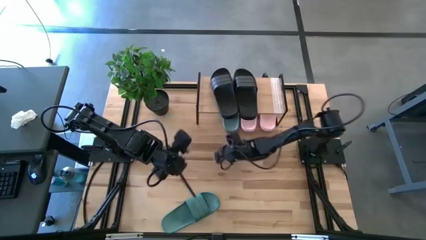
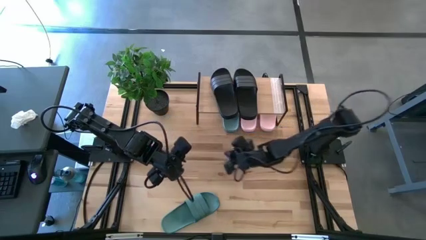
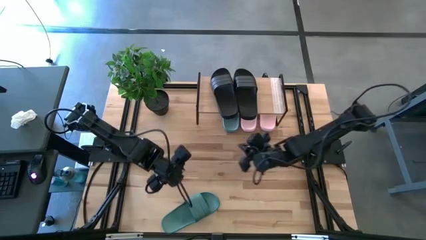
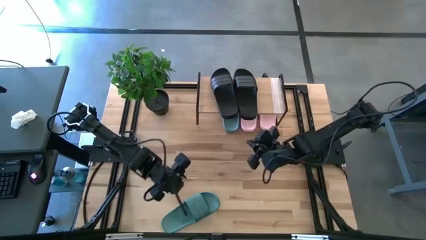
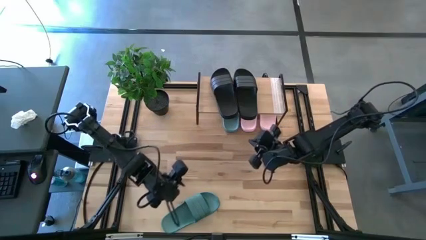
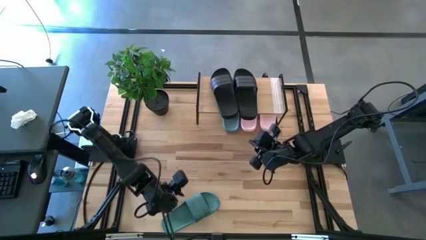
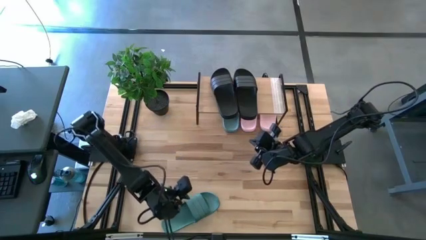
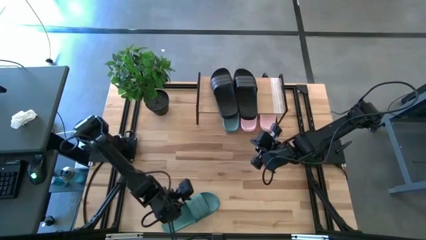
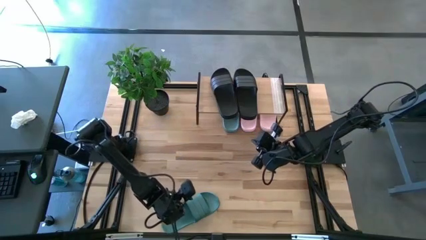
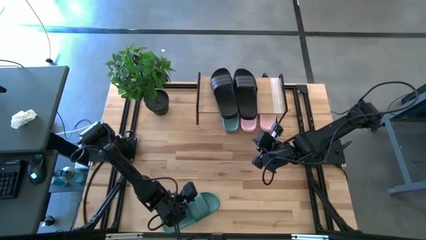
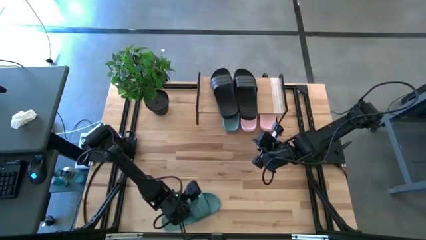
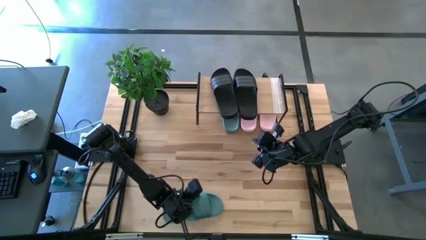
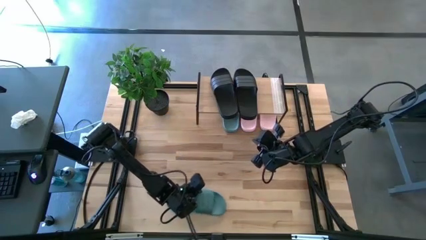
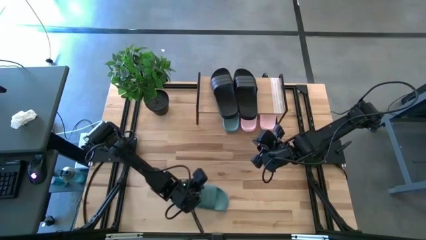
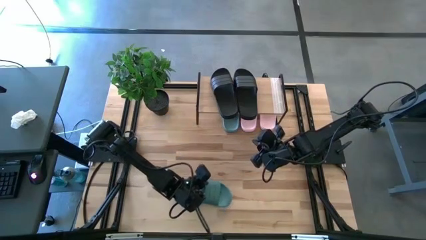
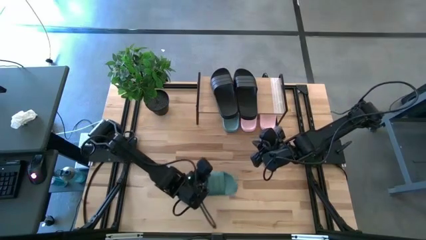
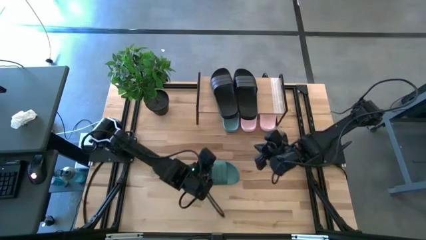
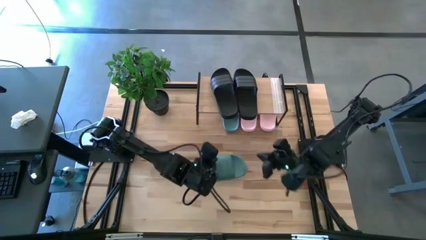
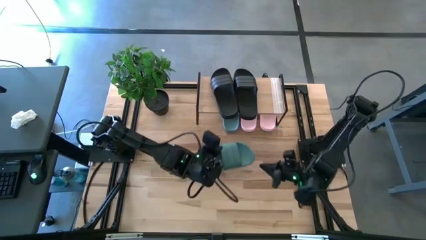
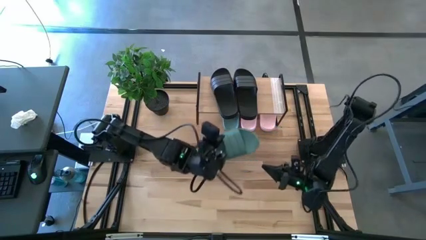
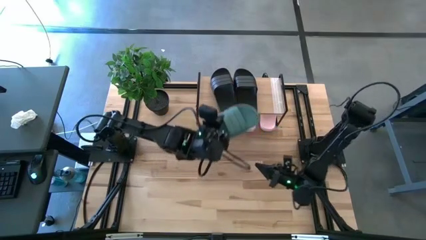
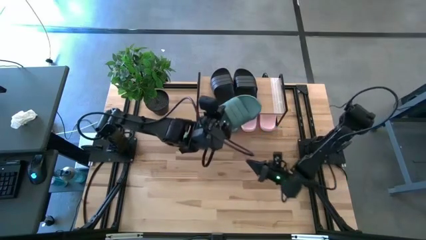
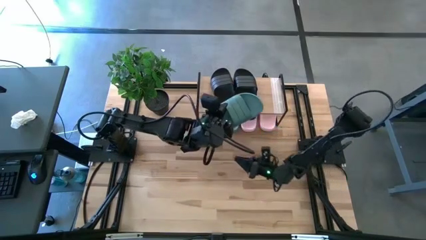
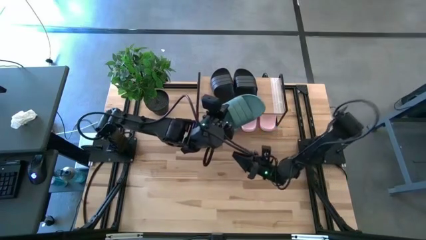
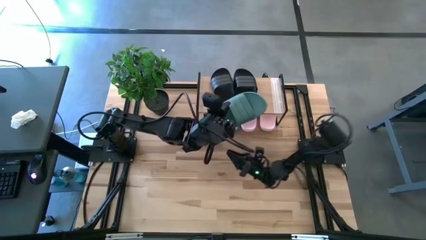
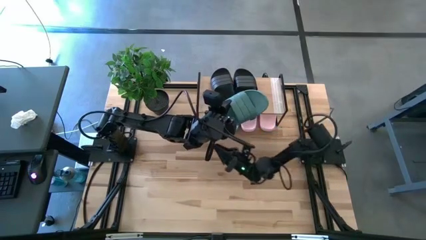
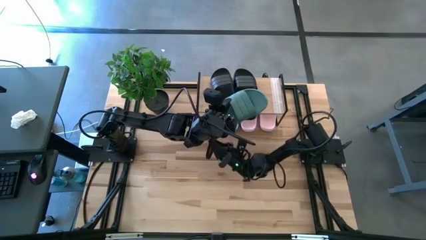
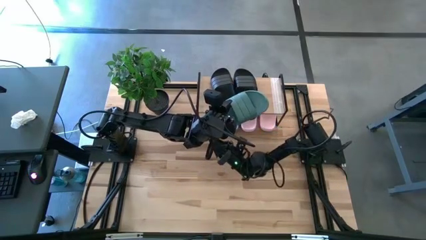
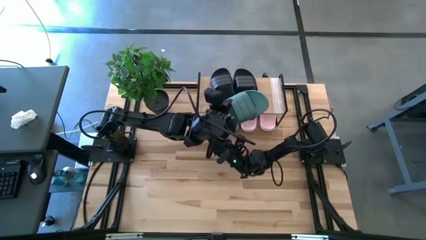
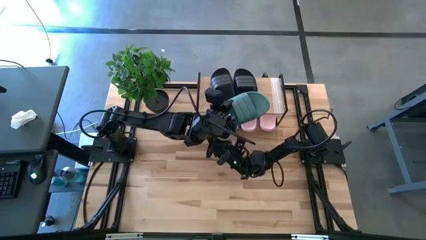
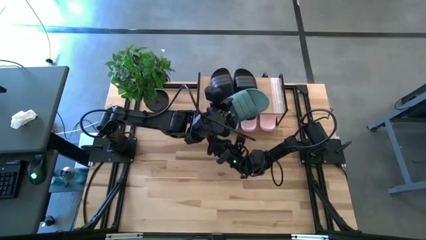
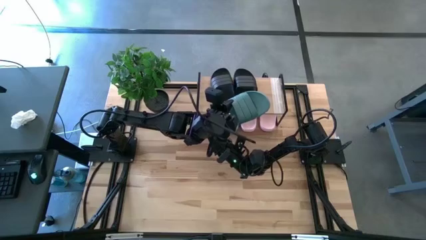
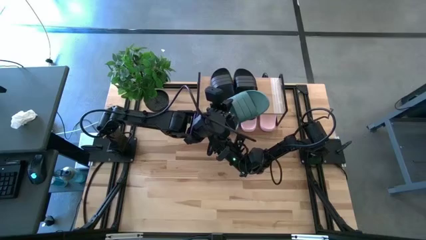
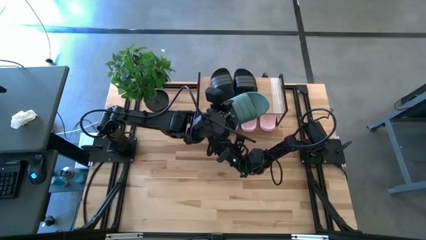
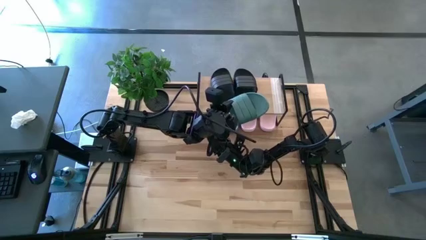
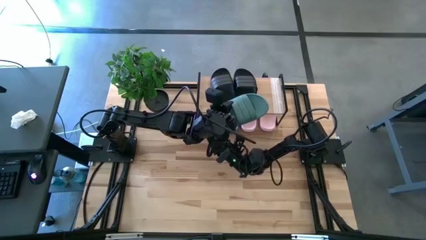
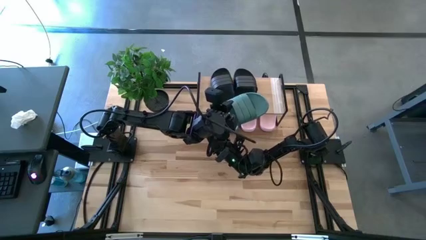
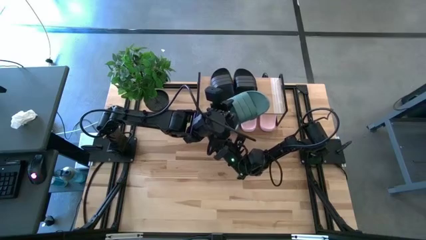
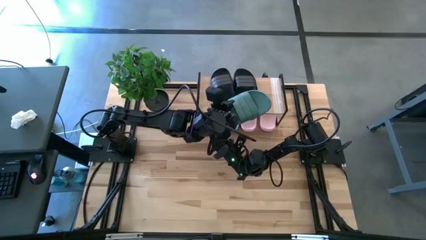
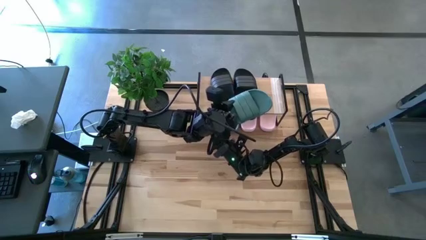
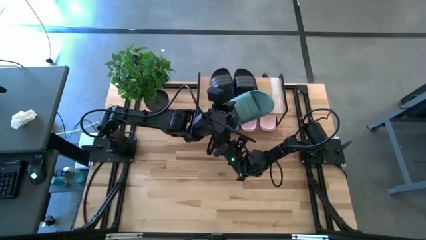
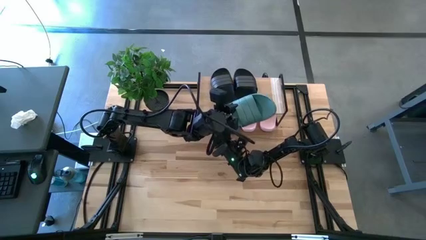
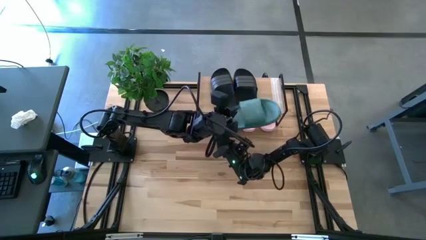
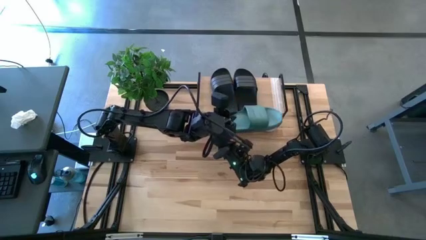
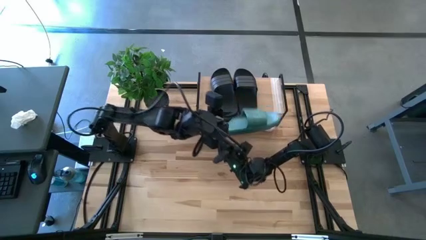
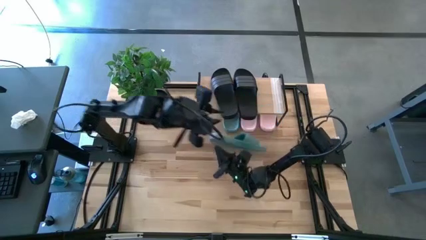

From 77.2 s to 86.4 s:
Task: Pick and place slides into the shelf
Put the green slipper under the shelf

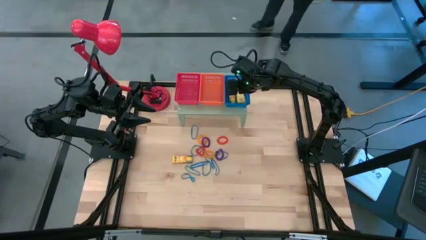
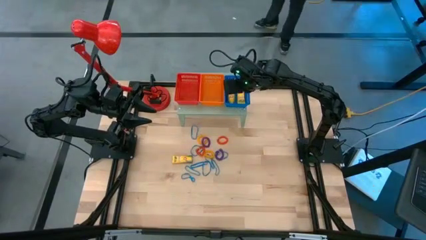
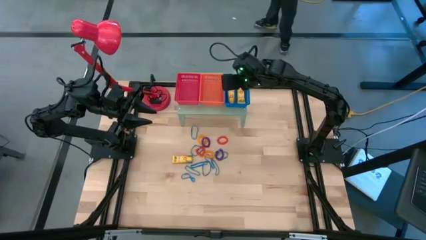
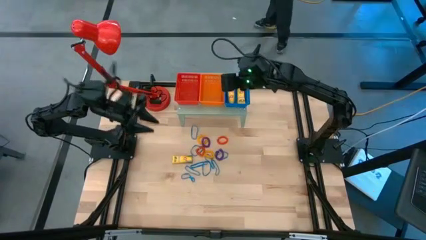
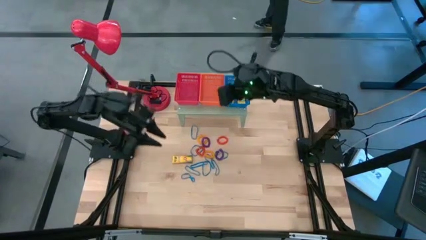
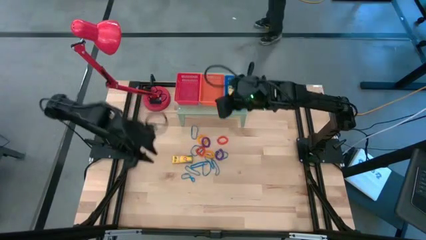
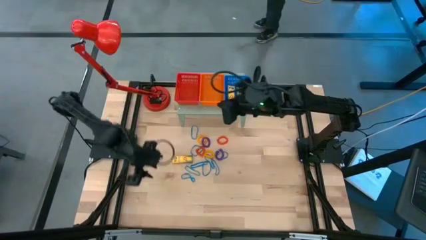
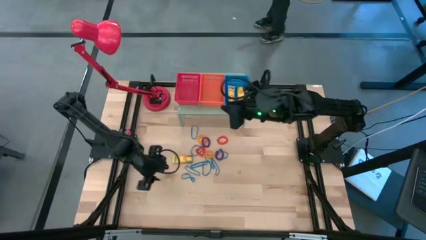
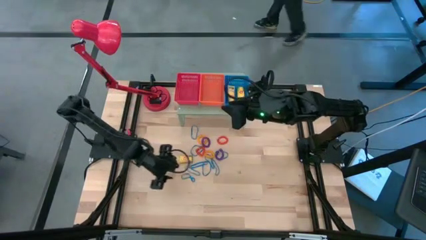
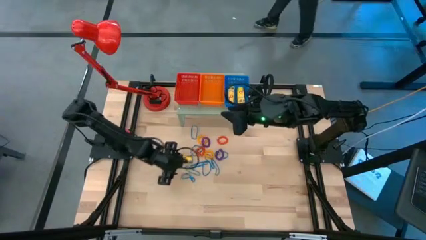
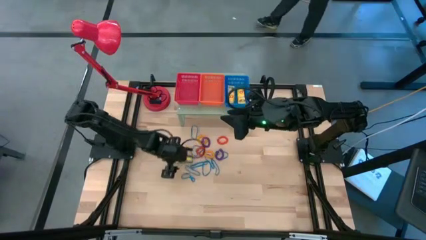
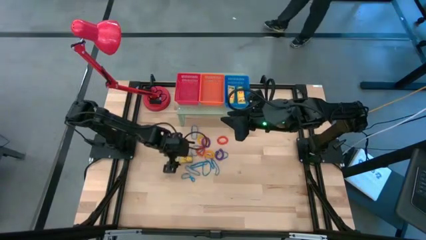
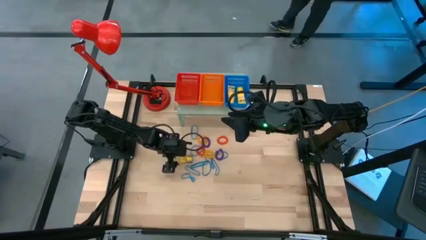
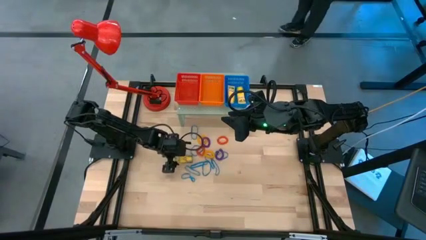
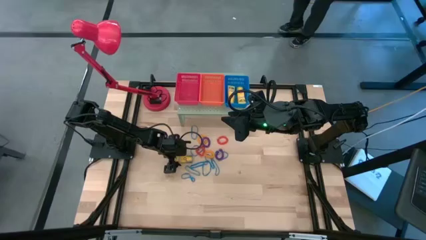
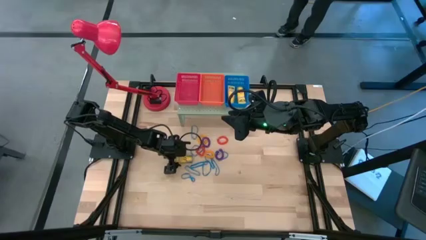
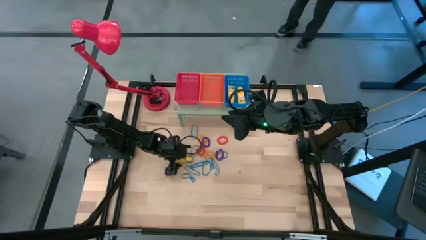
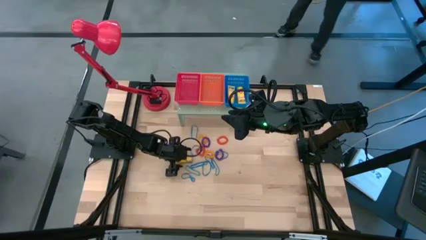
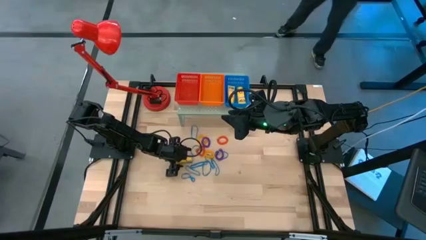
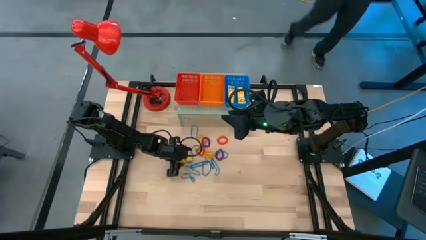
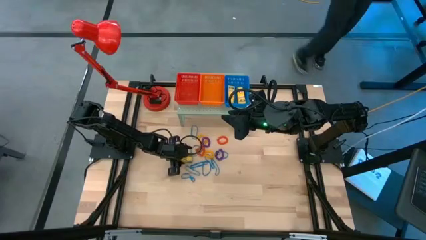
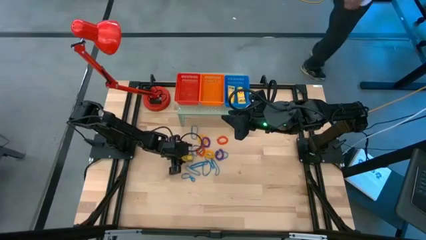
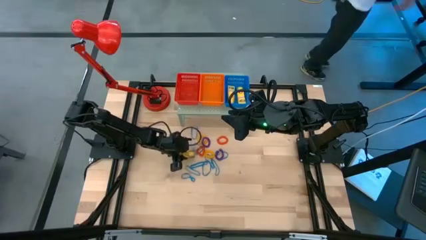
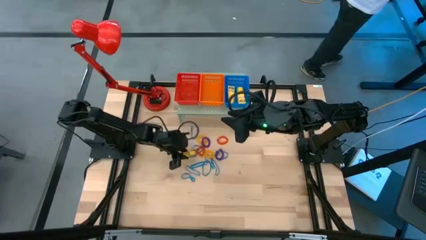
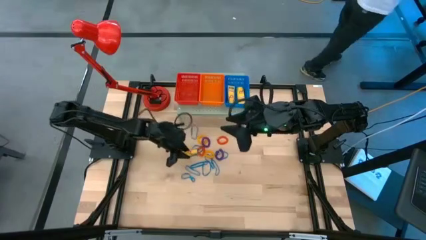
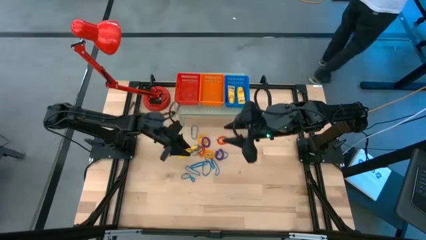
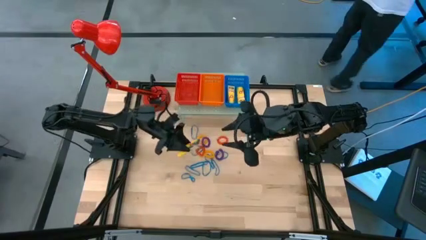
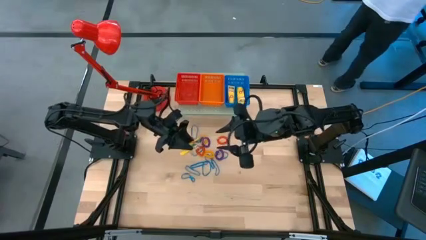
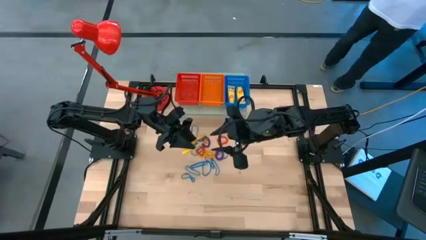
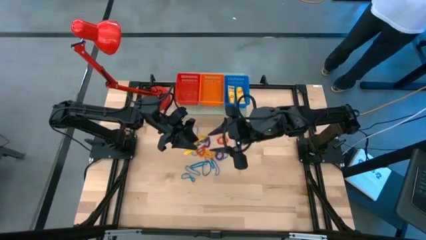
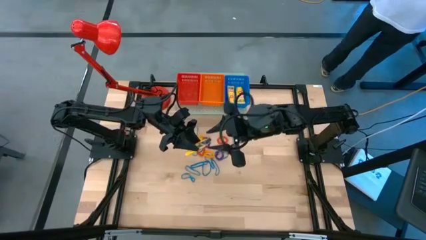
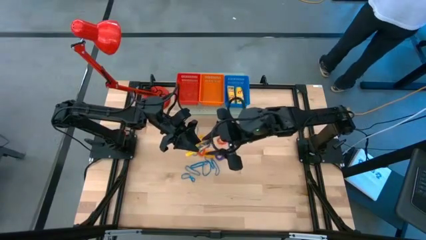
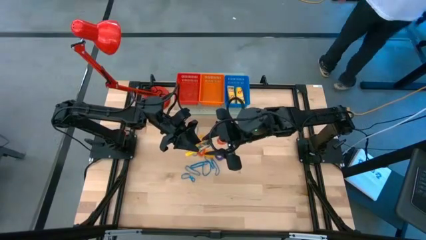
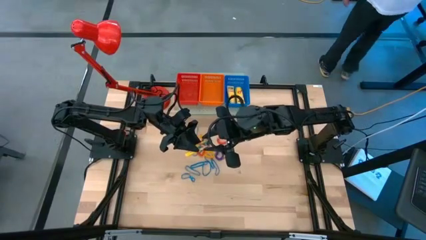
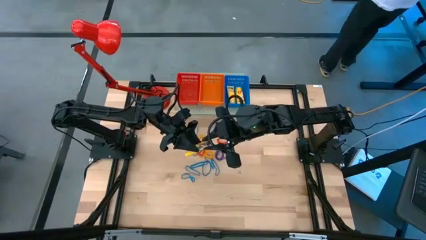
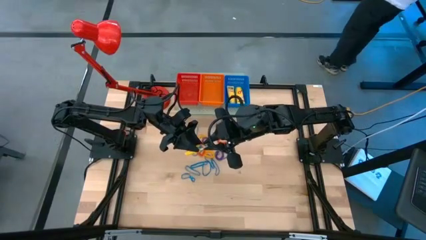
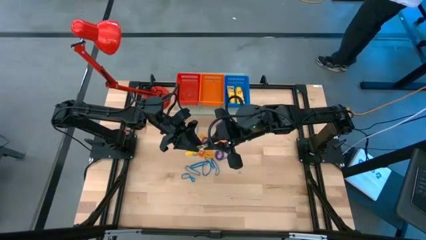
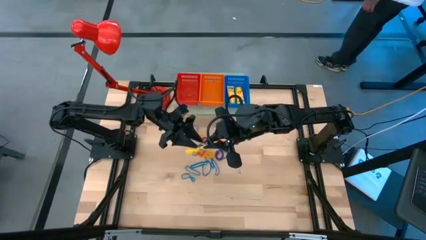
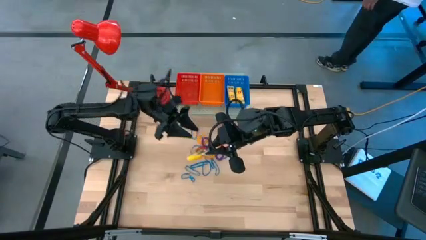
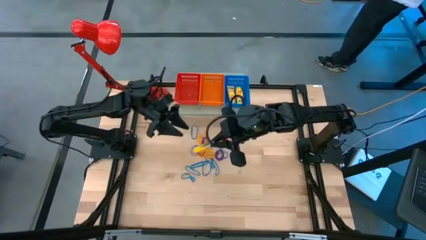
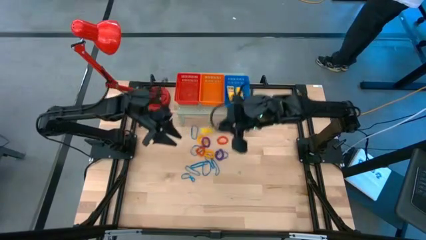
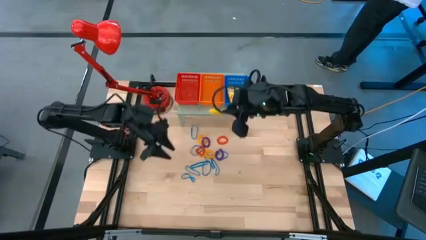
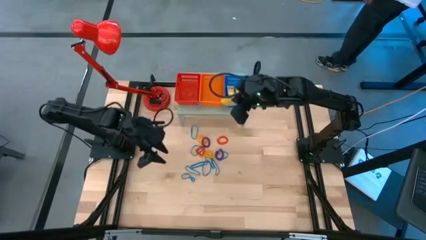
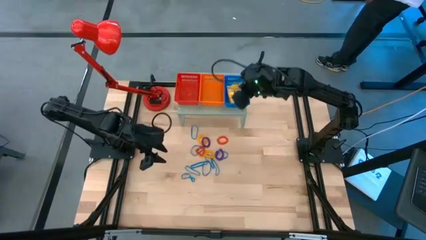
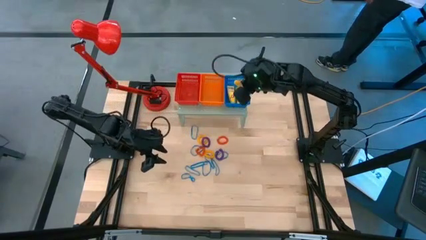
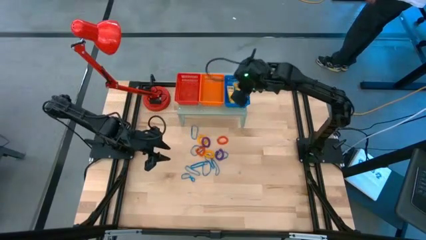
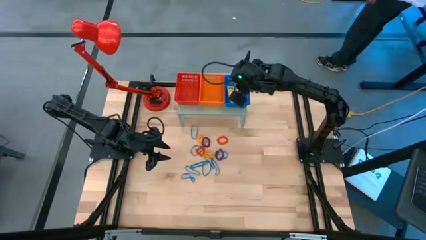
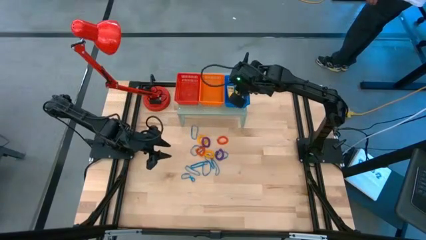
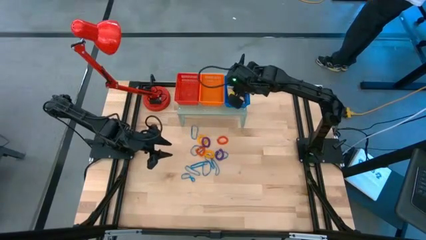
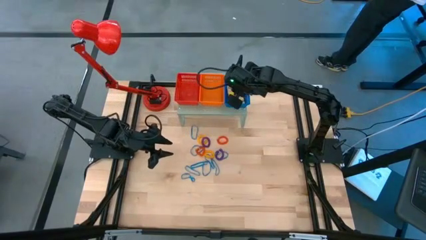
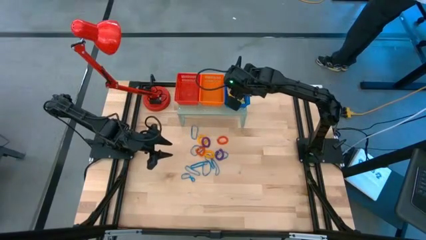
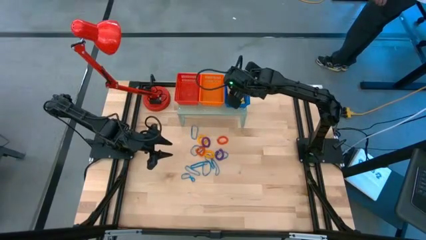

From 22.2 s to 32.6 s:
Task: Pick & Place Office Desk Supplies
Put the yellow crayon box into the blue bin on the shelf
